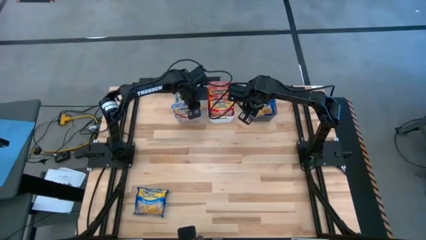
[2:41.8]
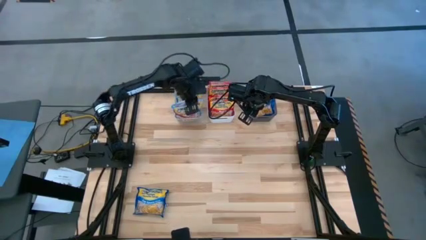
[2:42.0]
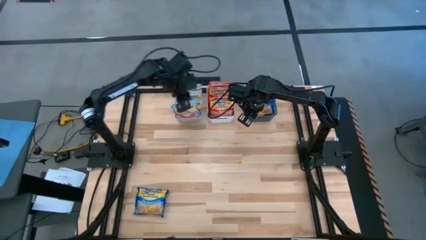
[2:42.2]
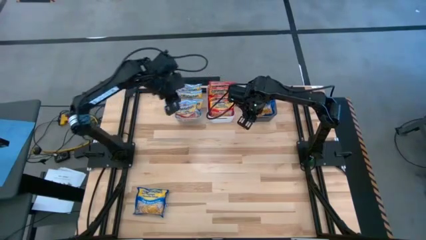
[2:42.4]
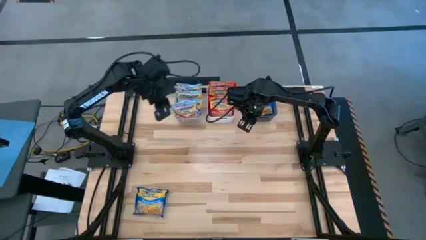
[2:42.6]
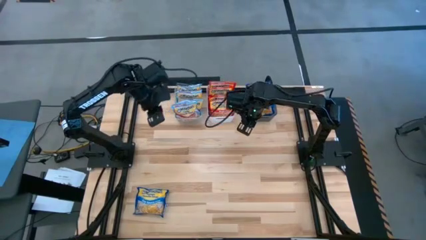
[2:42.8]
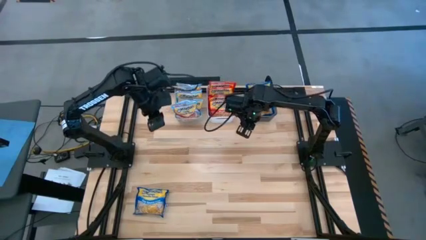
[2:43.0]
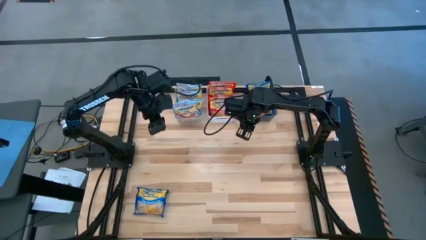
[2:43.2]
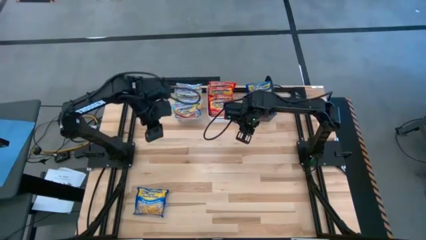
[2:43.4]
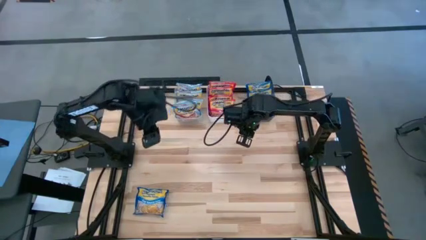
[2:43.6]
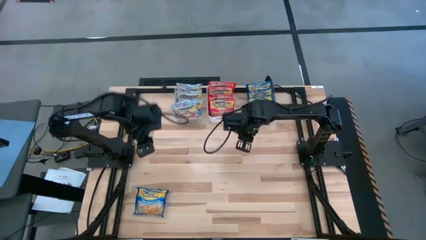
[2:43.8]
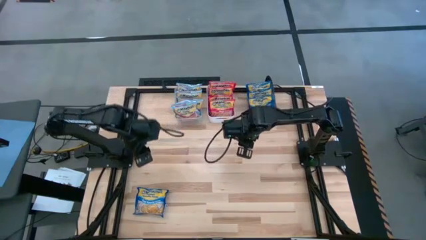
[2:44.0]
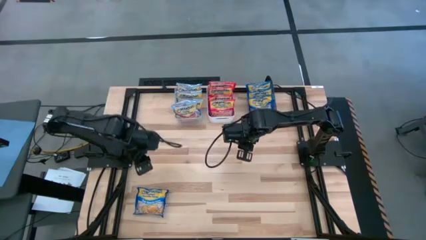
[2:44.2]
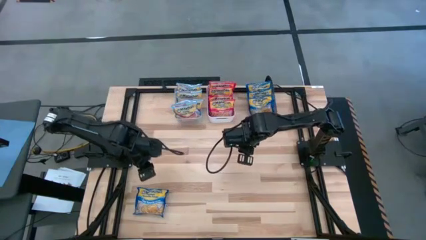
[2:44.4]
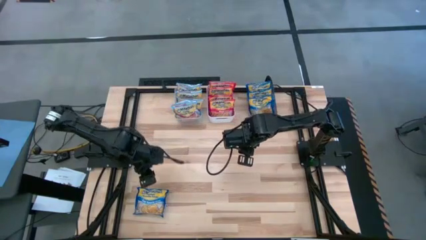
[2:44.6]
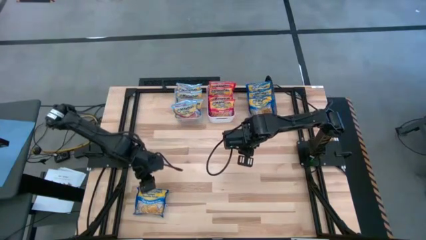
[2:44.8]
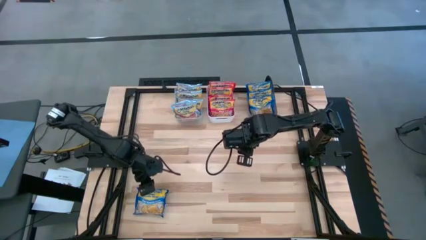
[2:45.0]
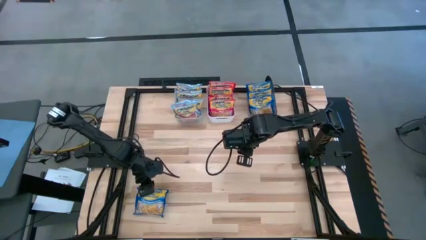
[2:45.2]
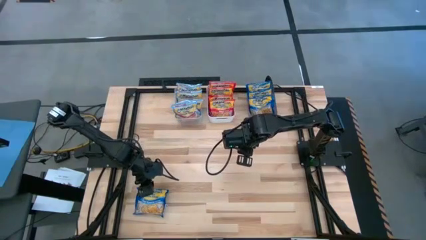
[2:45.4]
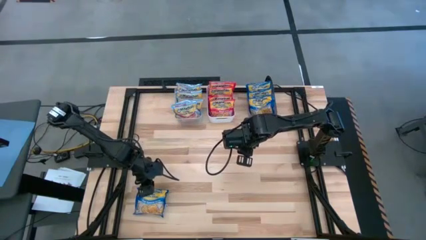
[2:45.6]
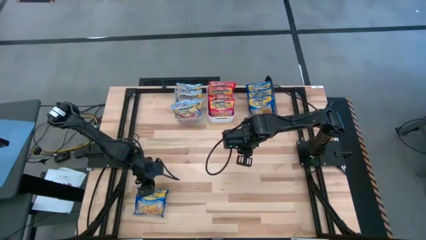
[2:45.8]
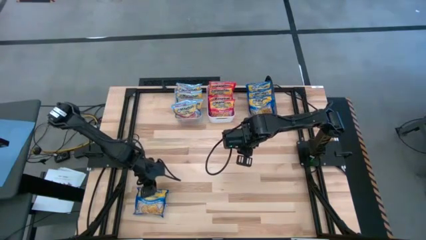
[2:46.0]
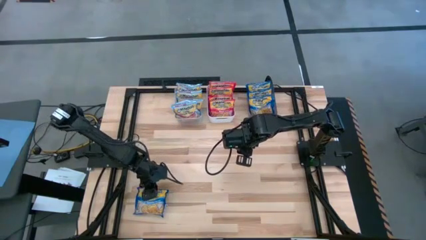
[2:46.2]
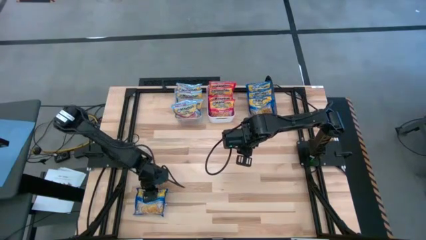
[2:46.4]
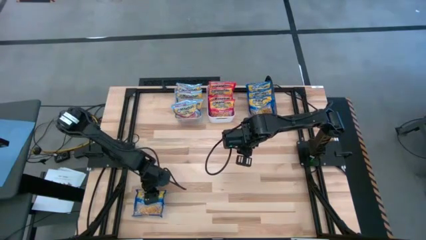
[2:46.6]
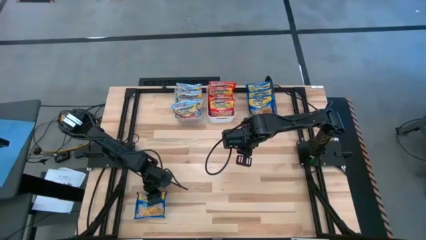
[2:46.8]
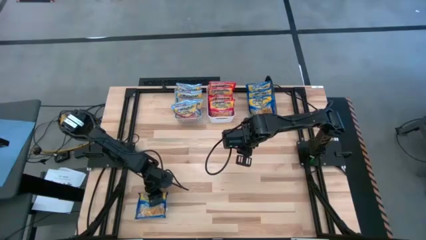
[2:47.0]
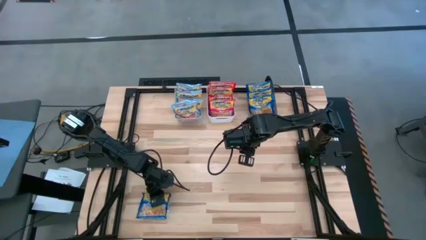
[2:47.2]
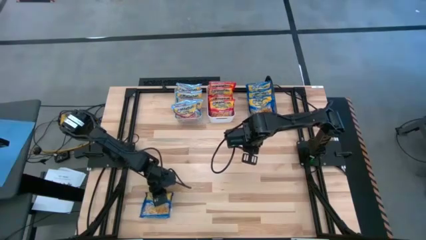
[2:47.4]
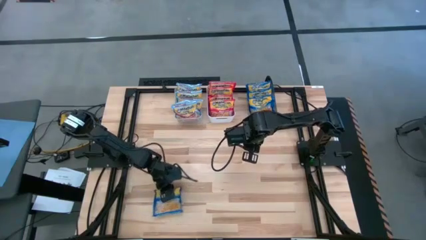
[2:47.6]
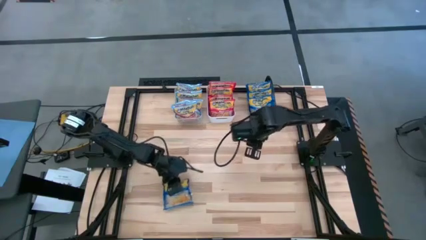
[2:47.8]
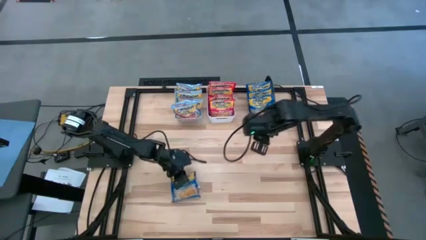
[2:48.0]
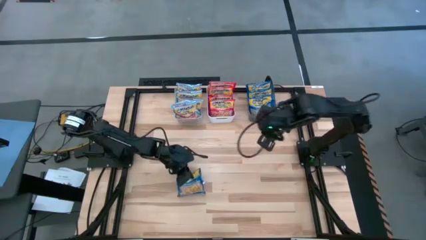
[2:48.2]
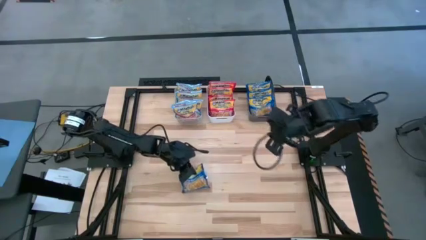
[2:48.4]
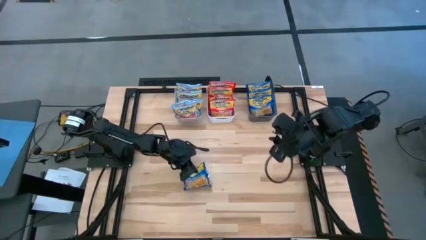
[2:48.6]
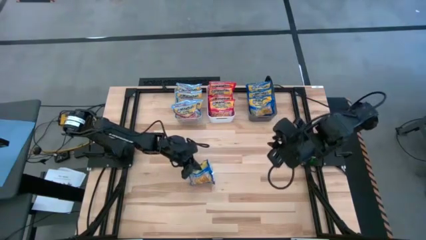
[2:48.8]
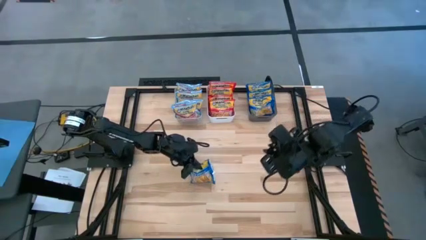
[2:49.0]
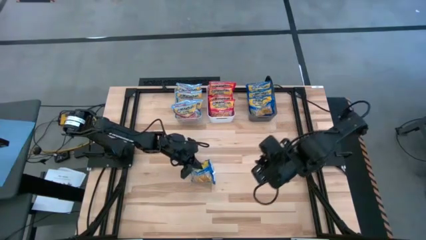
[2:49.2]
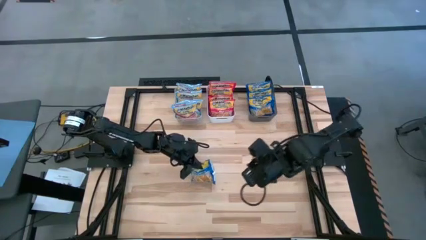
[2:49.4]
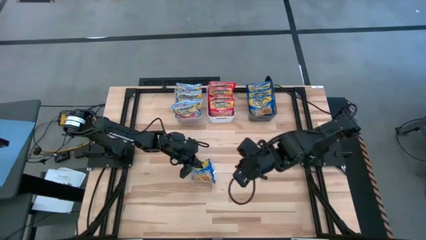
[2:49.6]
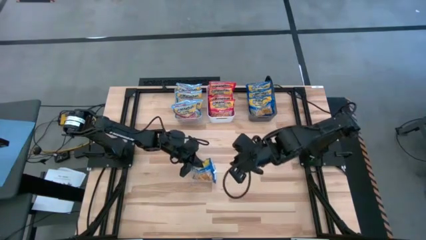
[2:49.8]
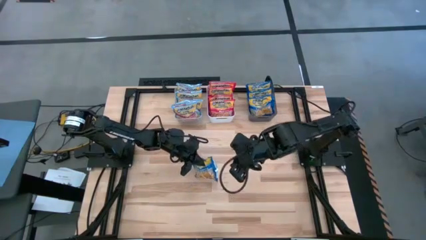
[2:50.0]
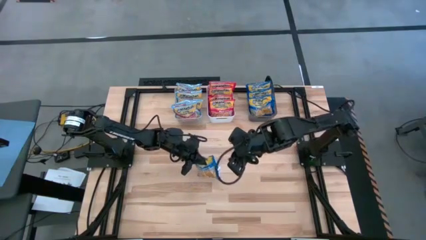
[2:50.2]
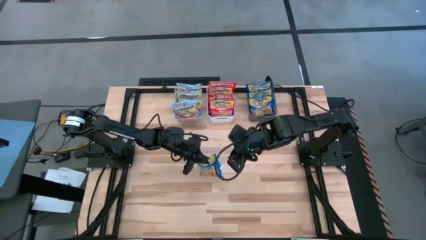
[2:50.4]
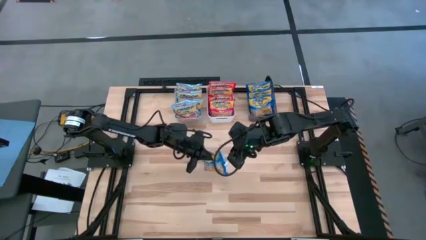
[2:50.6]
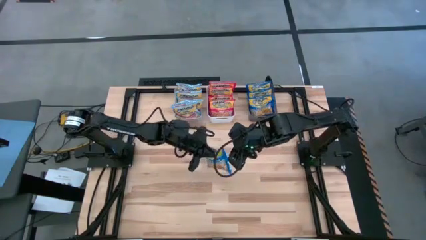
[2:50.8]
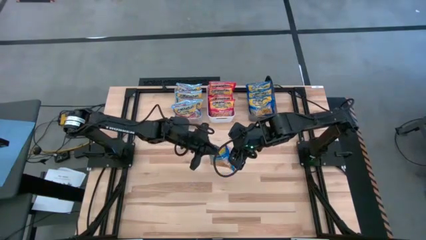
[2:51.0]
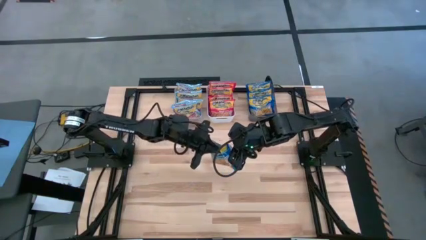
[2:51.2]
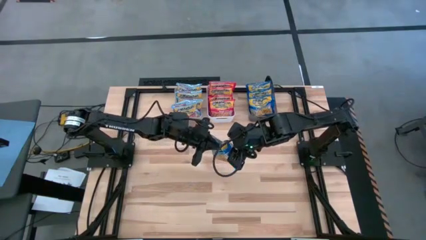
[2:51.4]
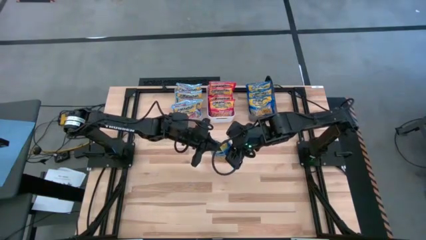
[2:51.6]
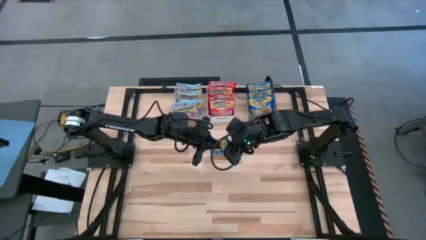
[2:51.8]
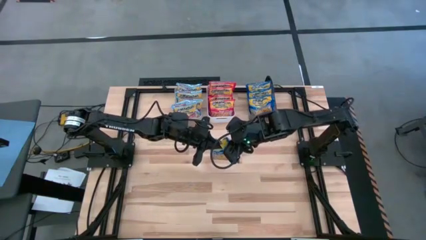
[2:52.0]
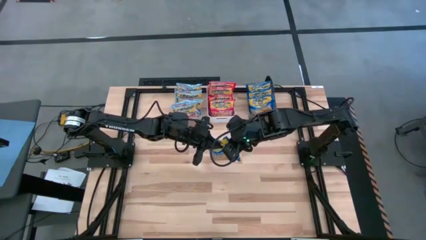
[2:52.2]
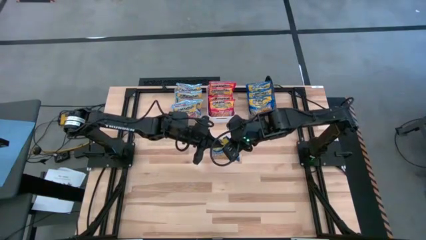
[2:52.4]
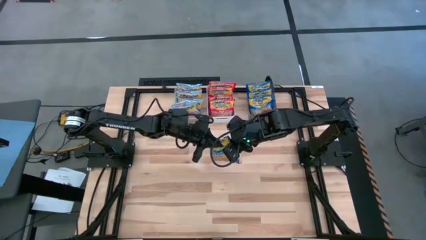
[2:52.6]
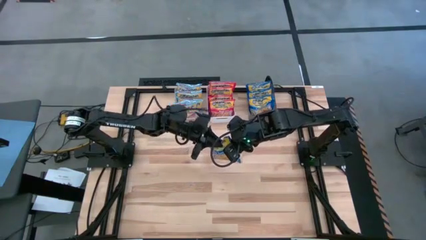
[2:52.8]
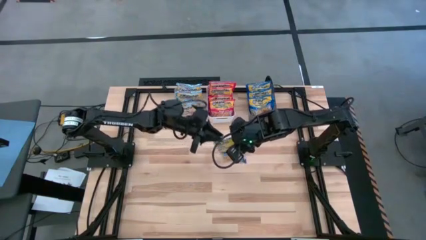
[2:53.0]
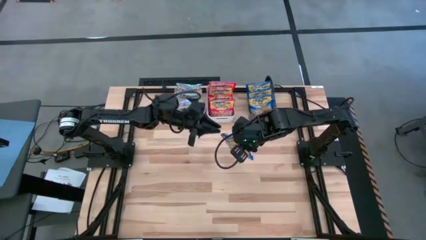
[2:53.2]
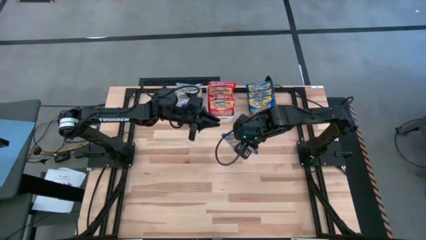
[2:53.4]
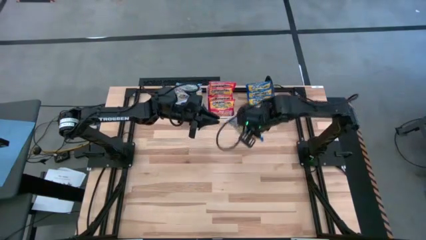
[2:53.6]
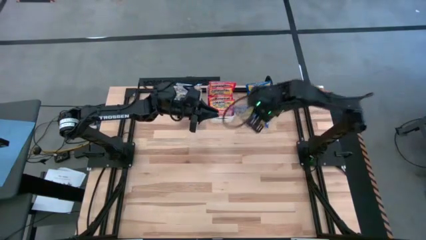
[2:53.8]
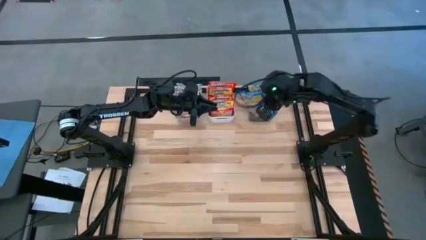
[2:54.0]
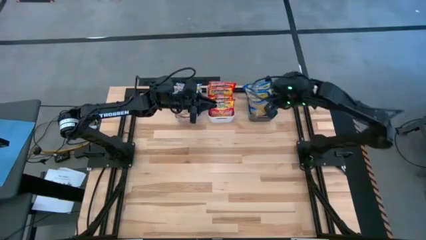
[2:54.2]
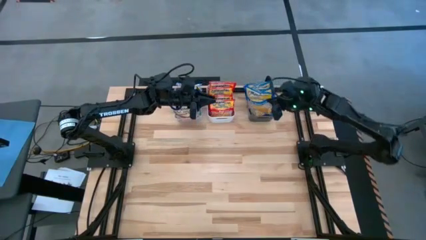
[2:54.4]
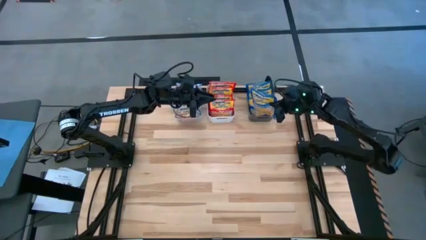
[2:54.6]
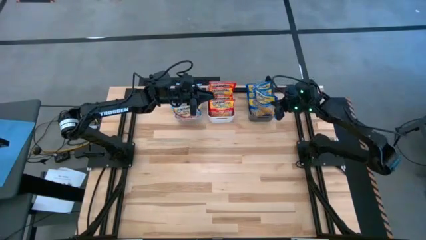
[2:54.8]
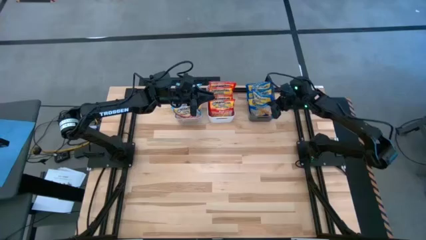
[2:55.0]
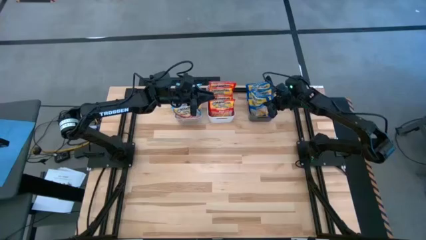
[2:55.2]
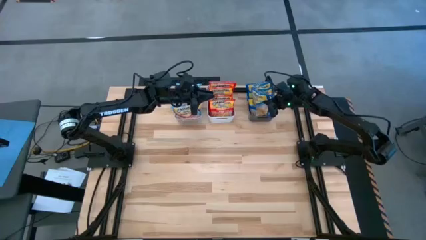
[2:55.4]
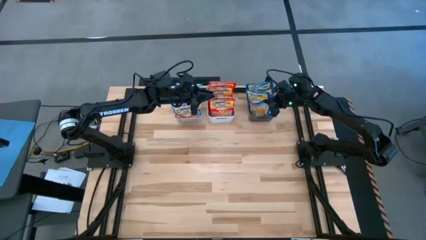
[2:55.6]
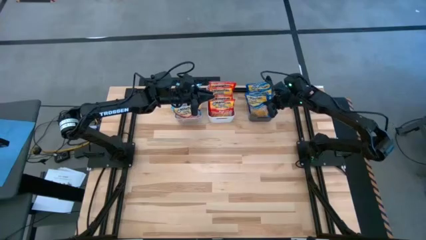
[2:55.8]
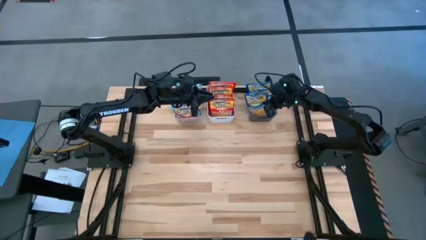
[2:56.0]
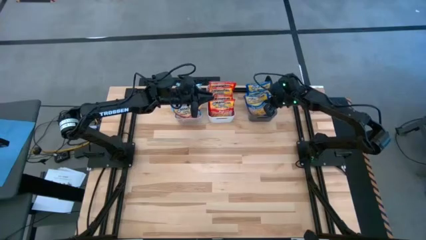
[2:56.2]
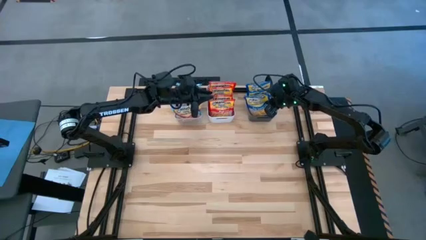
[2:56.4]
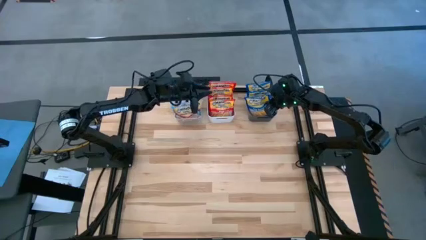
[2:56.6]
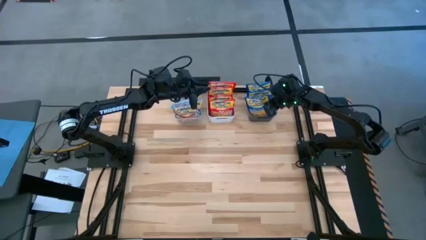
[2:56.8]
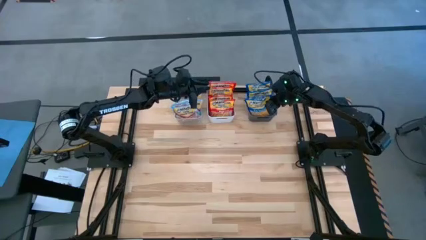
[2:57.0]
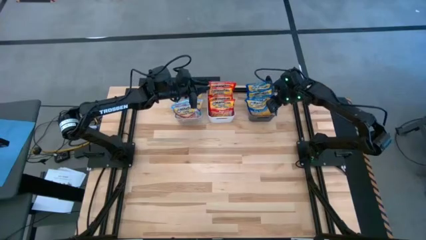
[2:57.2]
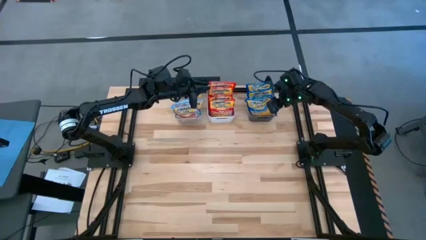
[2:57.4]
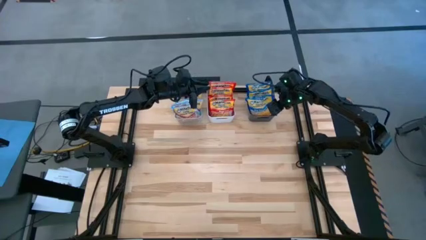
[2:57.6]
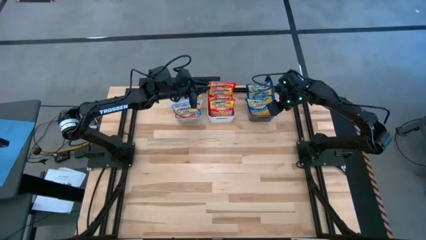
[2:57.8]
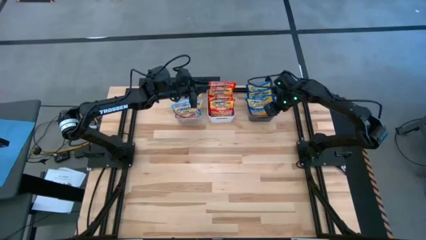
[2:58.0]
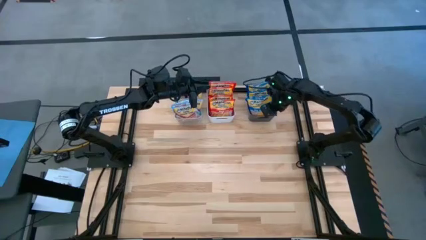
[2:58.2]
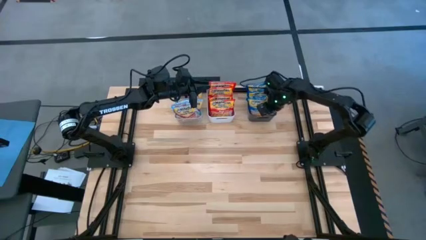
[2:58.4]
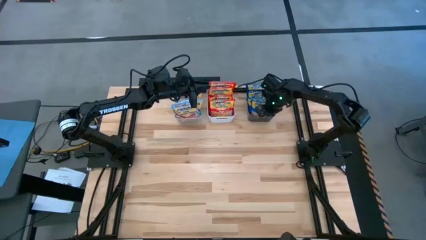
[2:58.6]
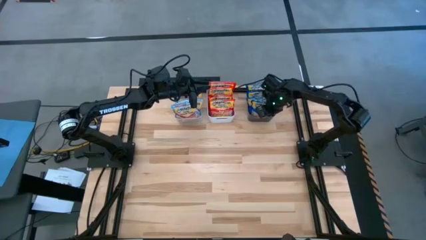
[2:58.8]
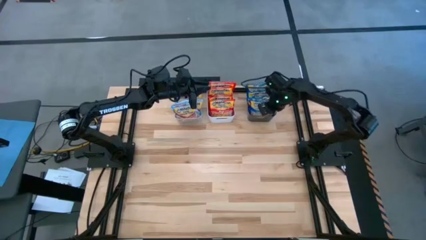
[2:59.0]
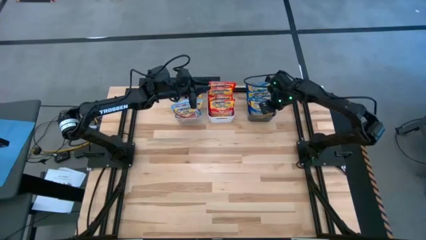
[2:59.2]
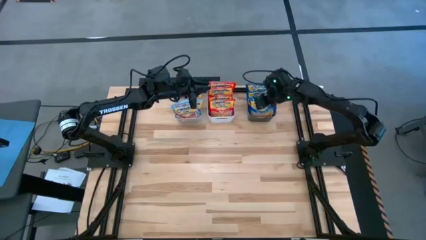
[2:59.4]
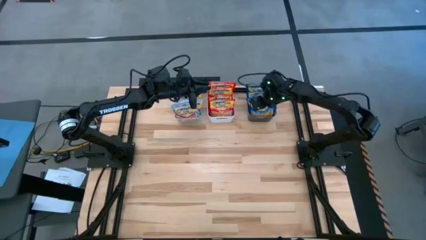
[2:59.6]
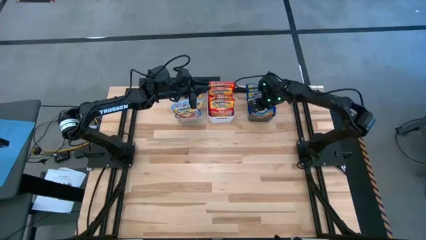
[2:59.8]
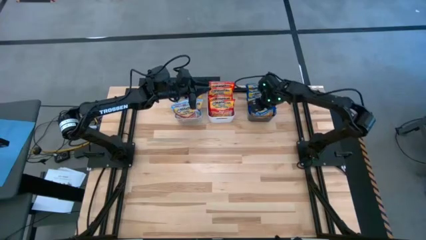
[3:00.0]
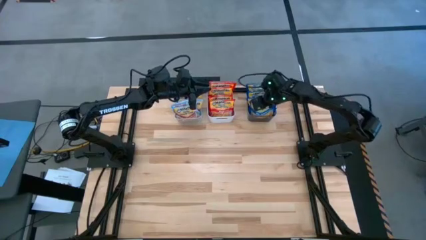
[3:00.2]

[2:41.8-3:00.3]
Task: Sort Maruchan noodles
Put the blue bag into the black bin
